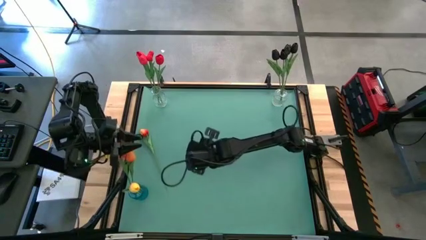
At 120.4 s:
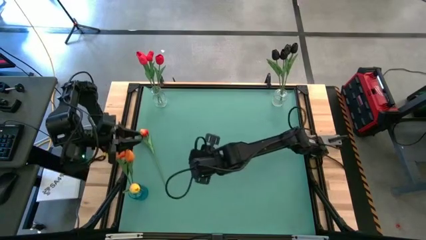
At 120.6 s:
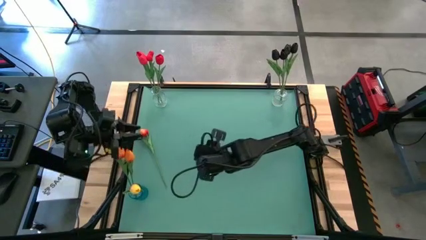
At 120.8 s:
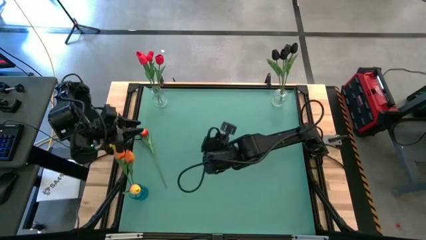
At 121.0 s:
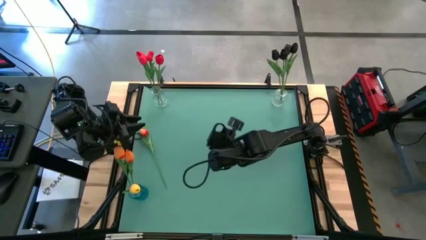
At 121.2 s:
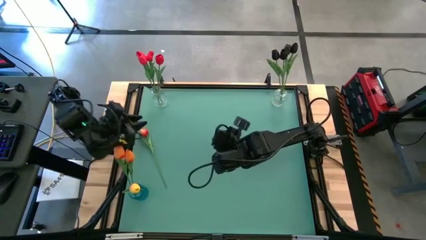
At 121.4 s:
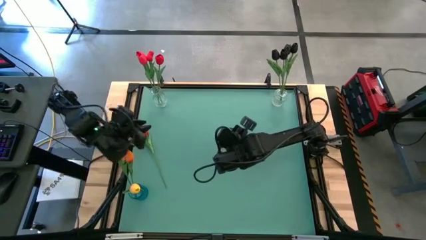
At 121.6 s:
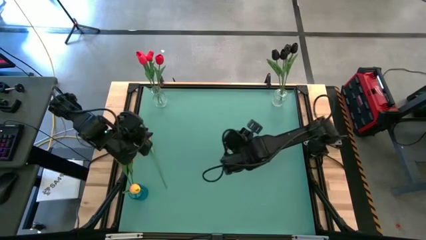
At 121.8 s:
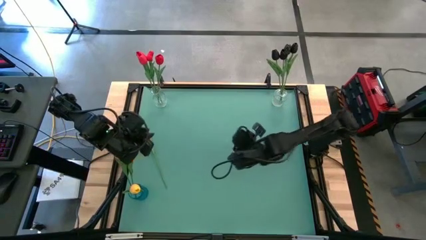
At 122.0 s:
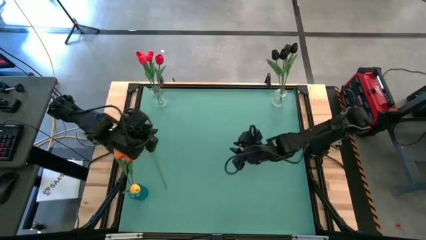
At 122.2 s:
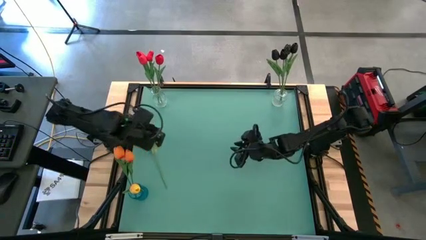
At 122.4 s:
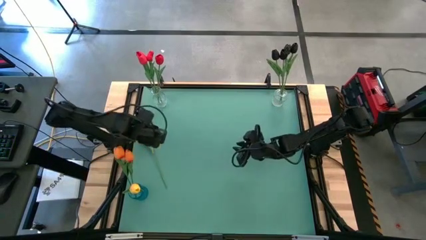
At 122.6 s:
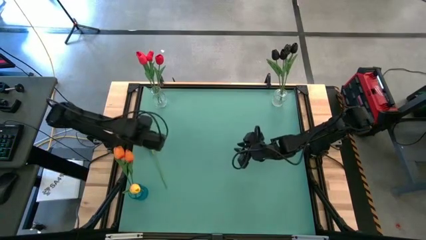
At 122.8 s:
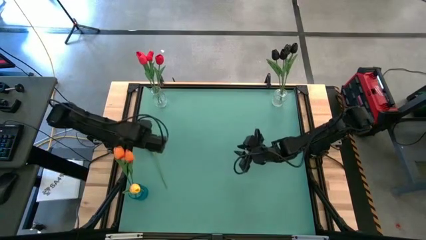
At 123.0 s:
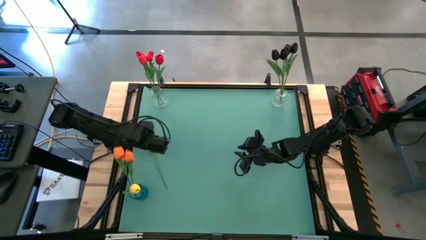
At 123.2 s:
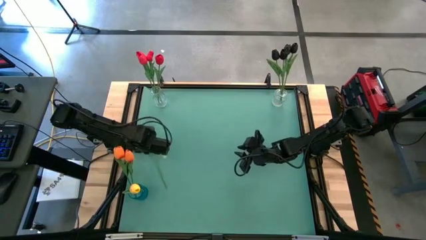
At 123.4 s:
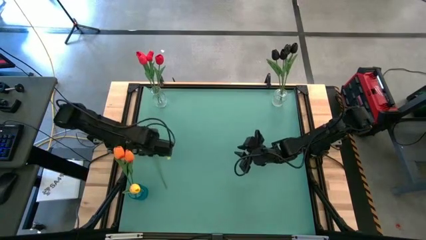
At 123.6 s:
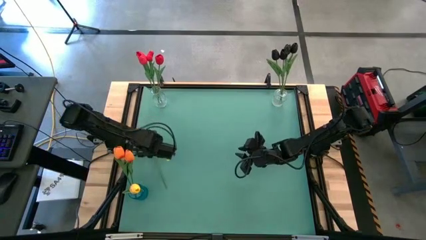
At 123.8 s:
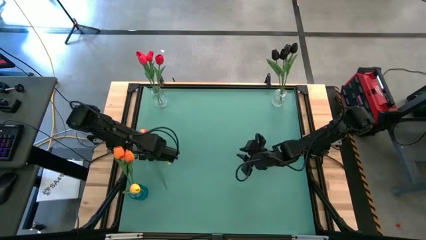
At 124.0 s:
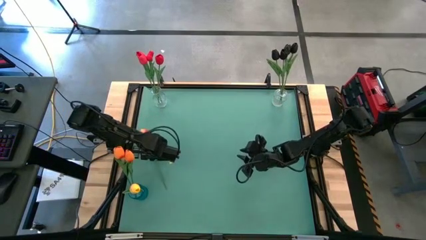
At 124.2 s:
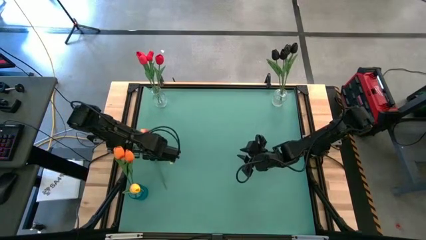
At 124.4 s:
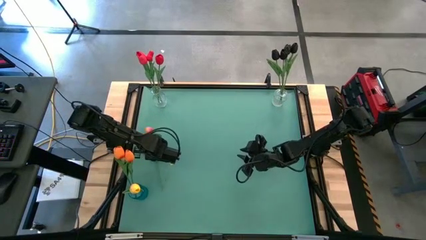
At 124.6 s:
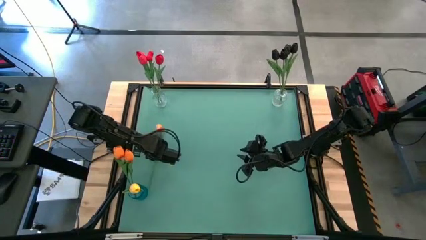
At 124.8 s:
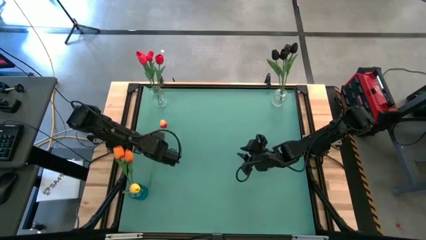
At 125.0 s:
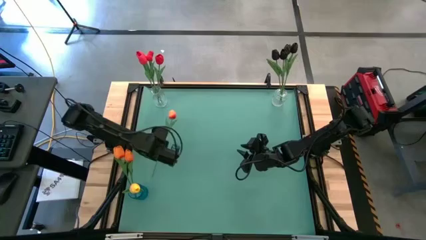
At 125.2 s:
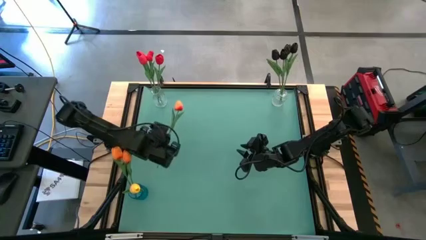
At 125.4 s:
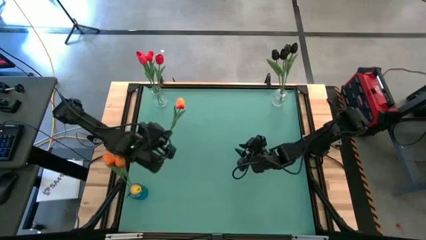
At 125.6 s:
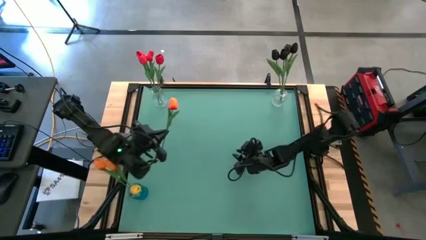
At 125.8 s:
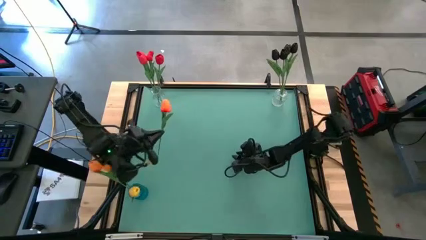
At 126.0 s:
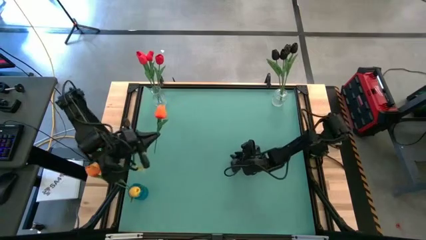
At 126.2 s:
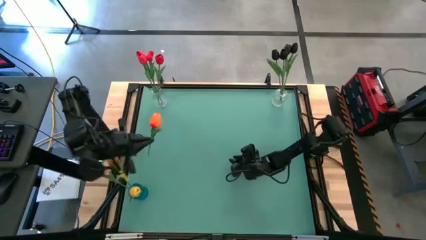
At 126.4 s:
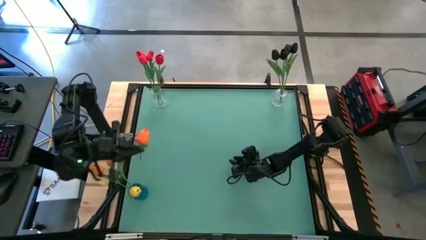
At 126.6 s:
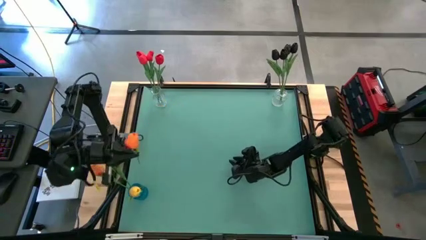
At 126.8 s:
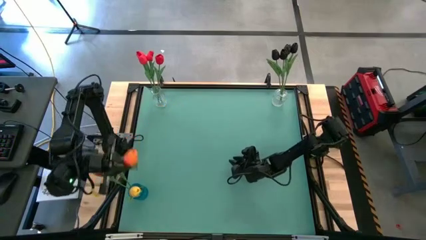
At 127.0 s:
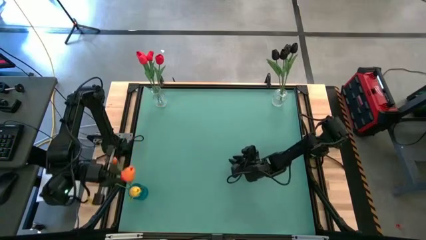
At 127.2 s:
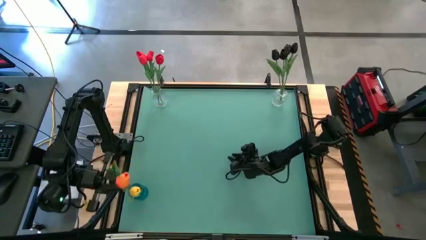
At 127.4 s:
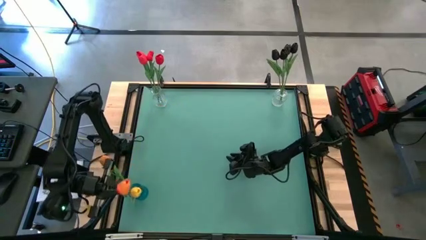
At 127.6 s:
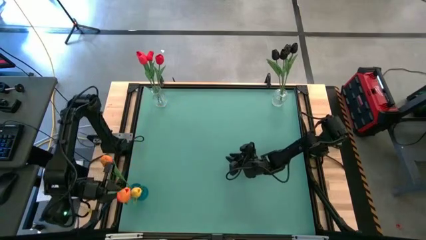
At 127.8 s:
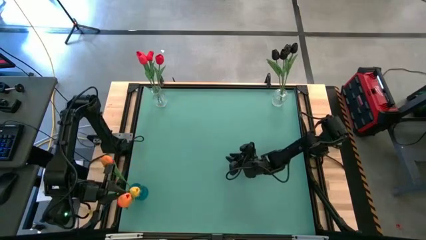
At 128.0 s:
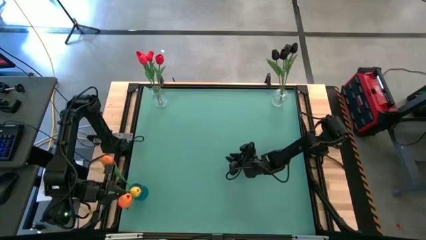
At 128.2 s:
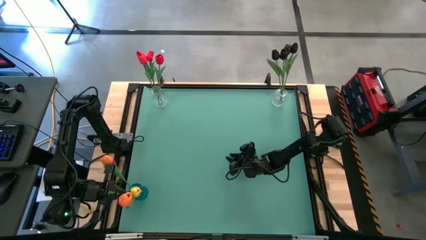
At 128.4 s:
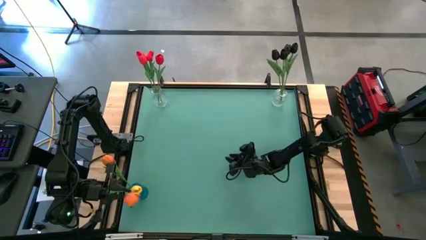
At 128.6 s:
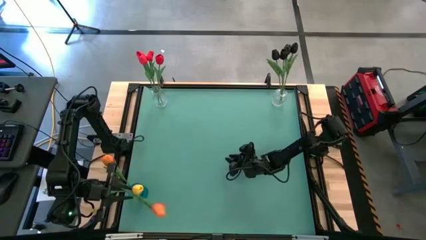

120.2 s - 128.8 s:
Task: Sort flowers into vase by color
Put the orange tulip into the blue vase

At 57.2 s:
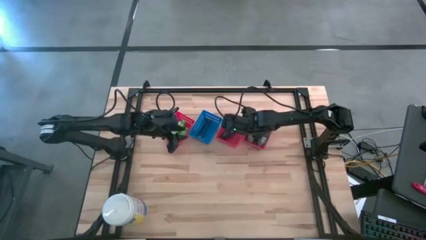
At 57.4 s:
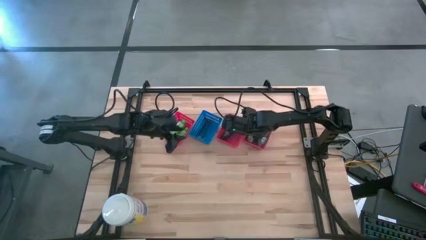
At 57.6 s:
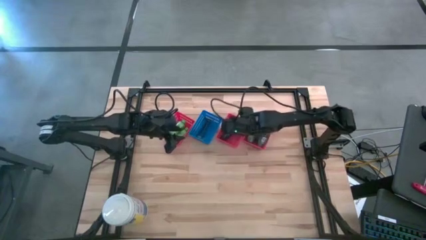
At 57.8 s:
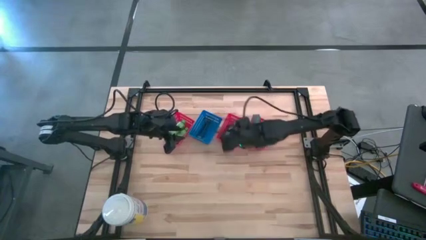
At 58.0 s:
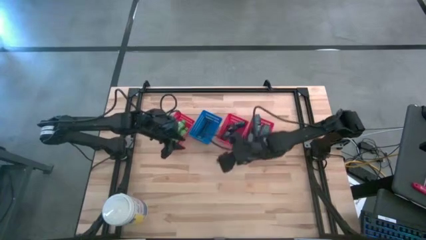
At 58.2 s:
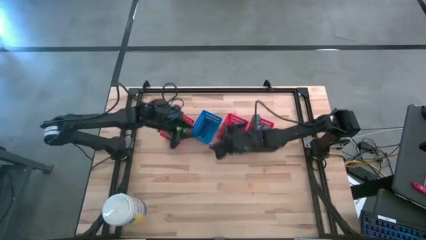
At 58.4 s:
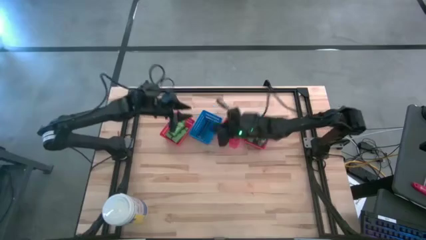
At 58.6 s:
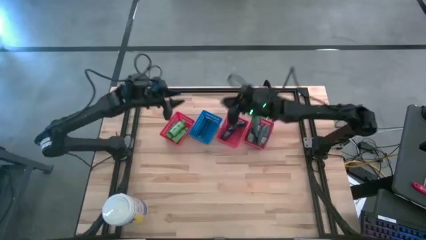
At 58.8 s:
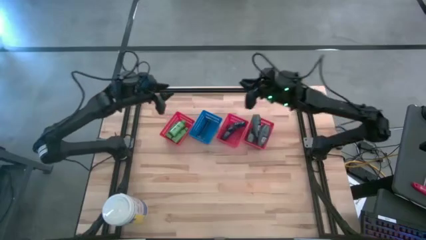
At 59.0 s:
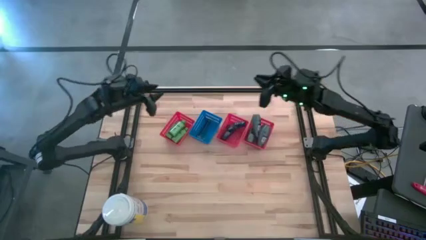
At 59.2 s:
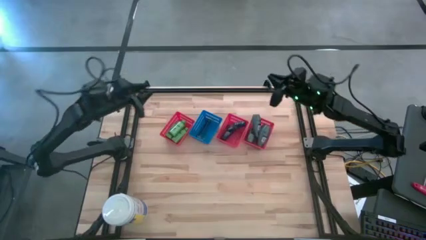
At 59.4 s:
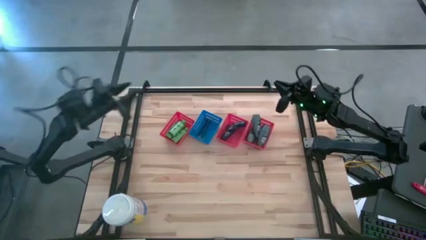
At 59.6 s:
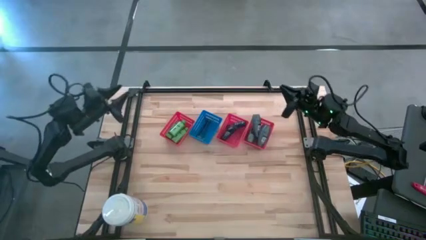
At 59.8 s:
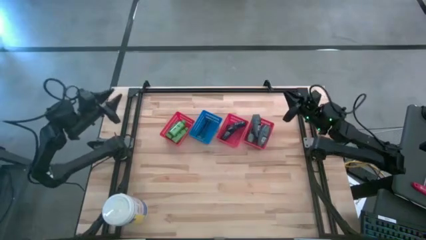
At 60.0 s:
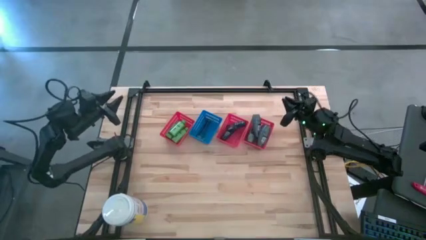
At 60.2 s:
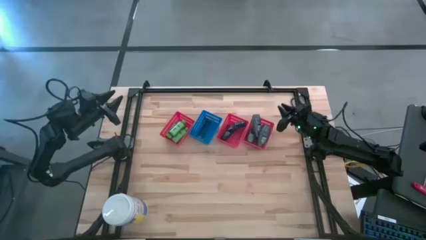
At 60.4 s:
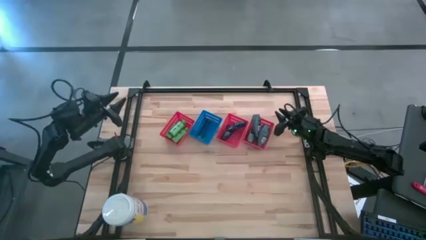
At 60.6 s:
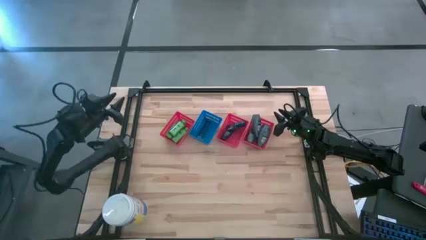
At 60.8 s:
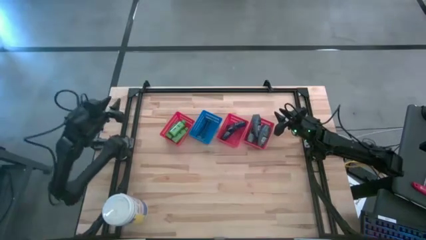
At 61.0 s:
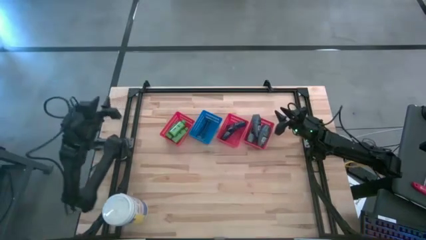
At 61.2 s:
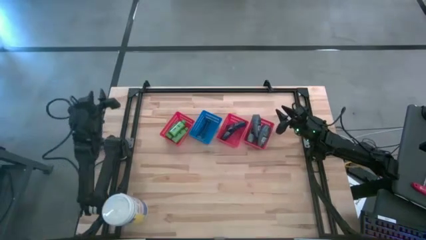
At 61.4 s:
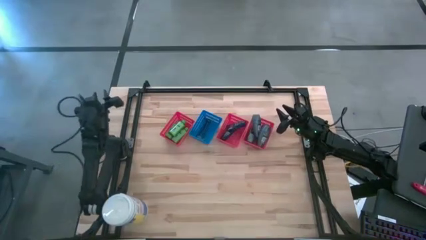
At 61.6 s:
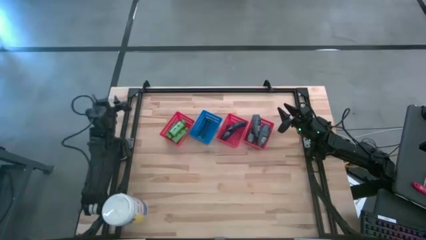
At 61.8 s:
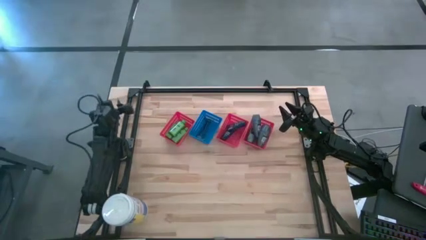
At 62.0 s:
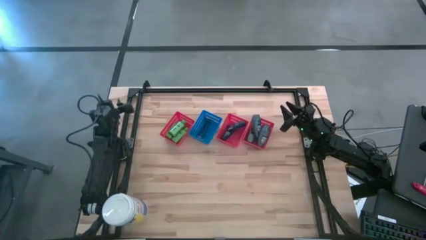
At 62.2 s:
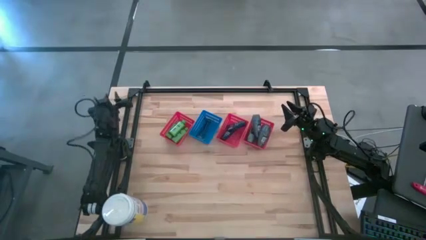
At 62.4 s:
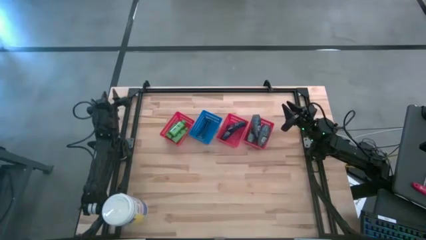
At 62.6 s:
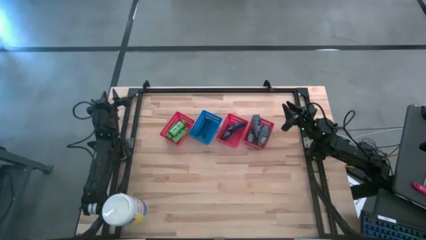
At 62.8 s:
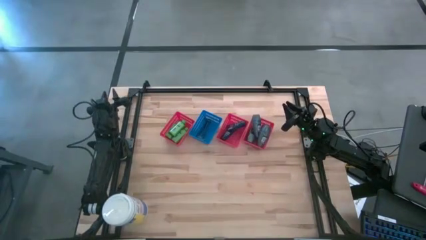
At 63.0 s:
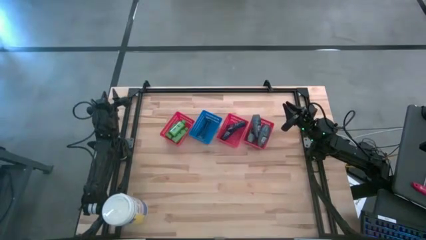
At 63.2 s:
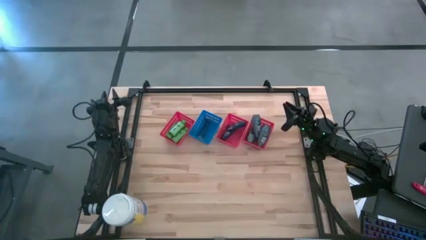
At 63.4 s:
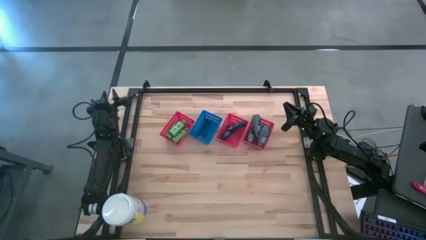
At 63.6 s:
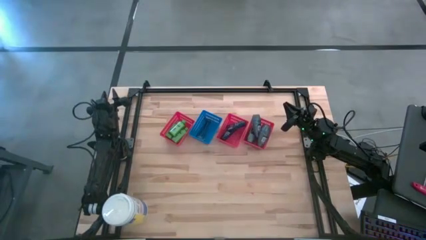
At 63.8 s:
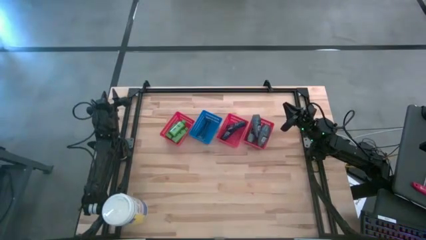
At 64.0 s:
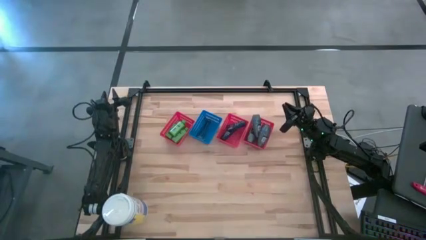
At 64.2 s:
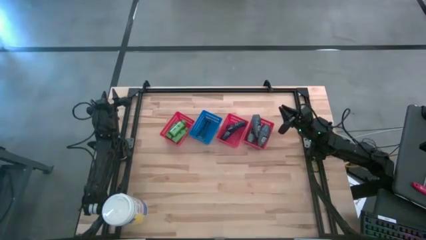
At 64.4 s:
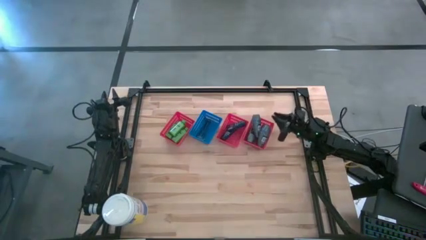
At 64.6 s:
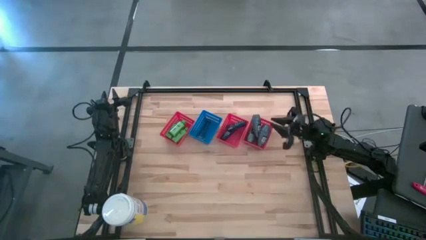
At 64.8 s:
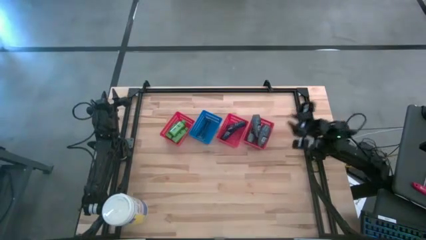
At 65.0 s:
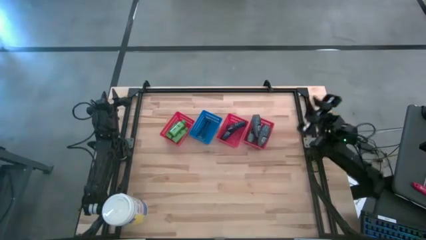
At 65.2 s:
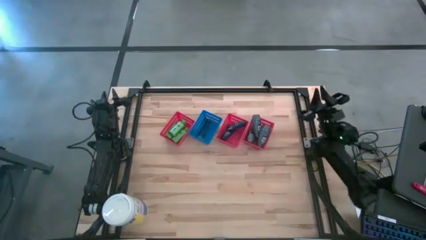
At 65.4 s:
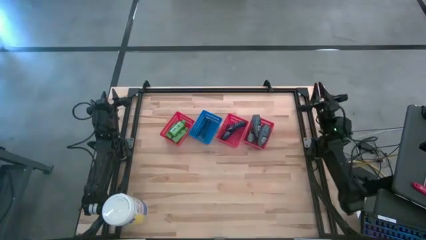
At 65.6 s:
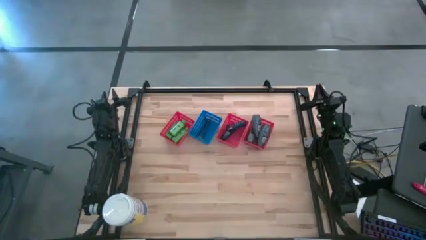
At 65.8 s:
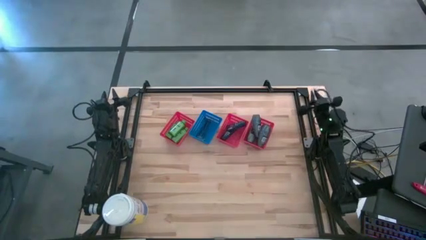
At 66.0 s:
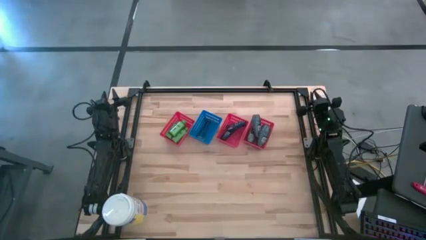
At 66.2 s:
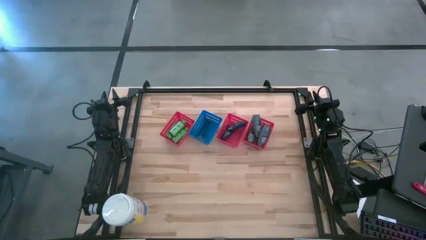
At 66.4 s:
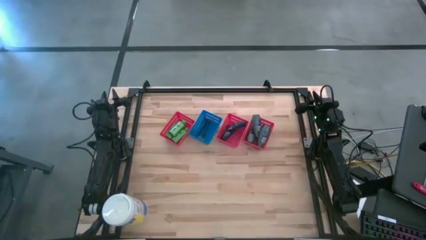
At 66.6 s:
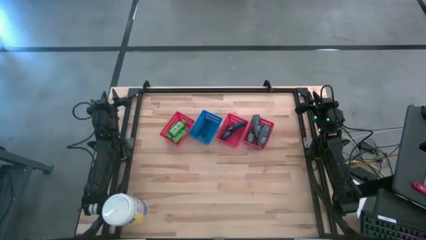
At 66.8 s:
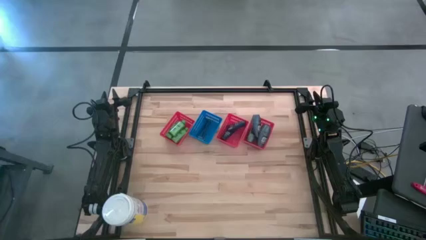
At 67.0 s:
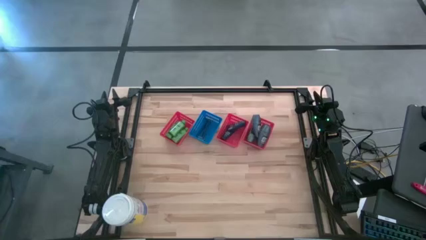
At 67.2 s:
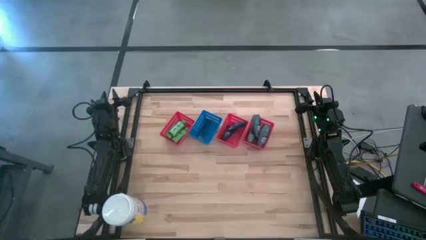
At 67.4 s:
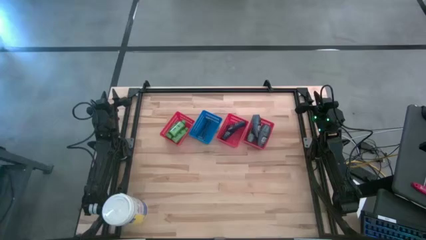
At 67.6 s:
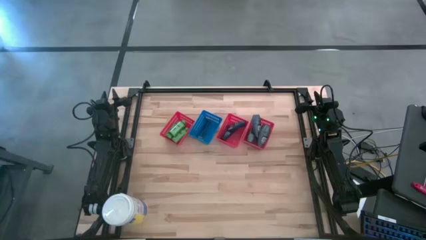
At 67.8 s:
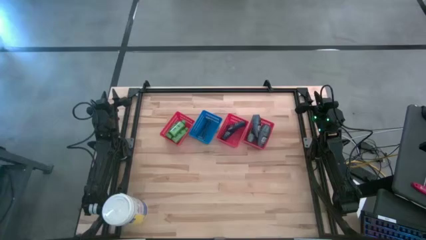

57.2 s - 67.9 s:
Task: Pick & Place Travel size toiletries
Return to Home Position
